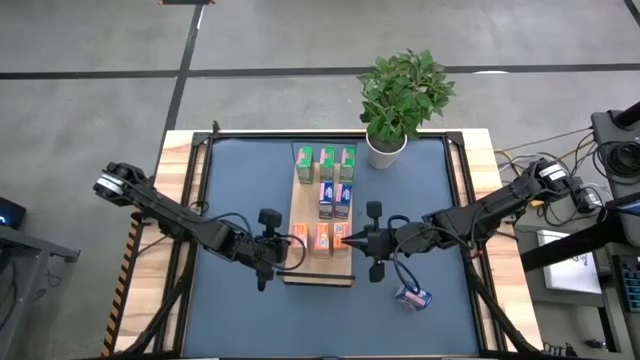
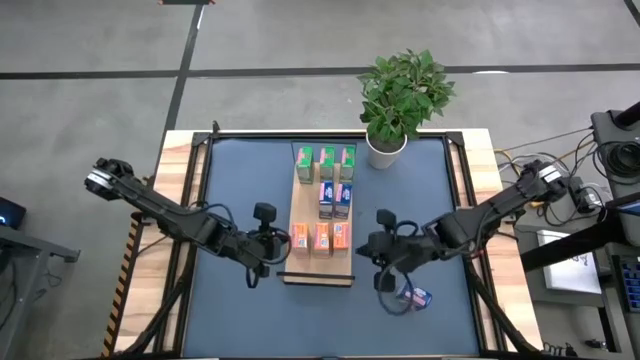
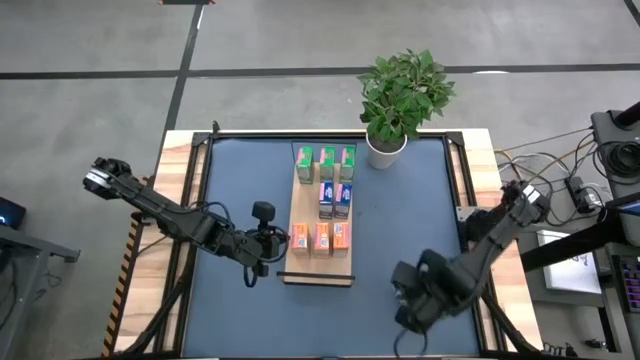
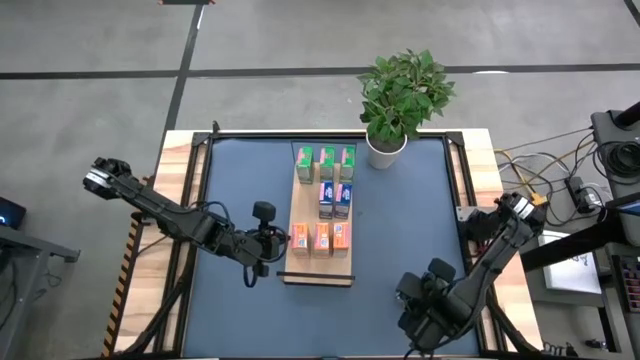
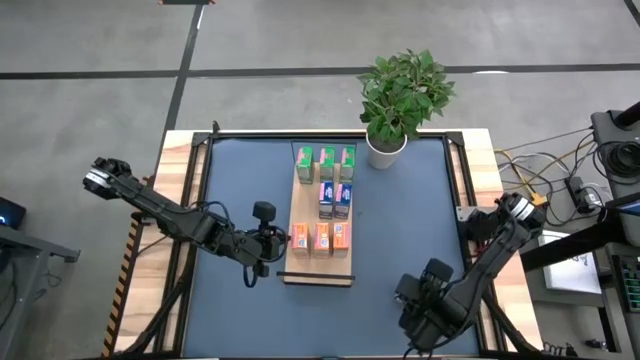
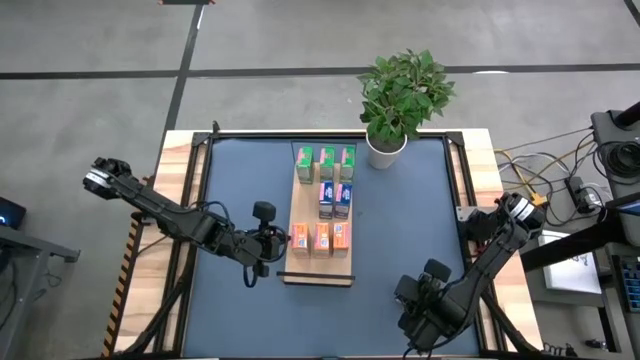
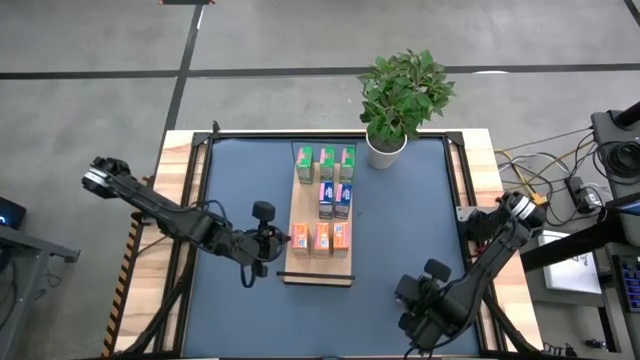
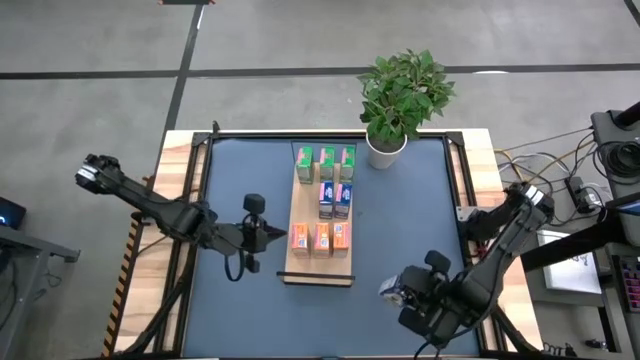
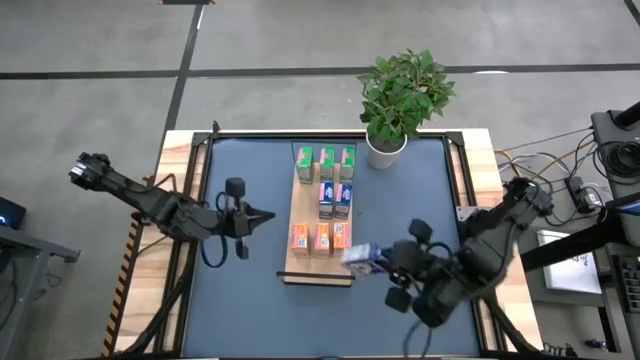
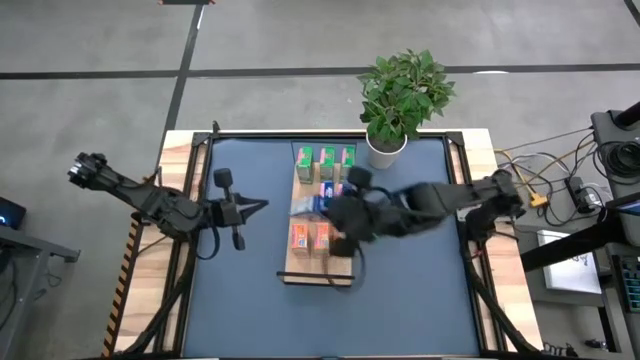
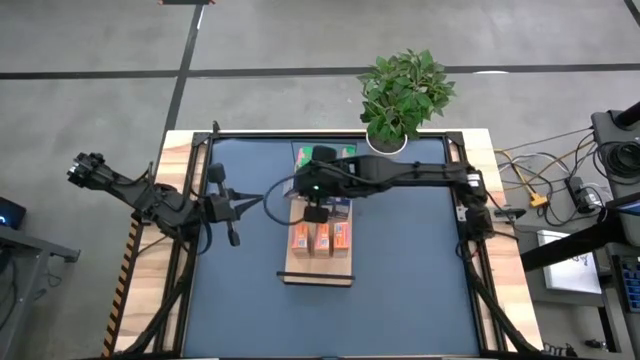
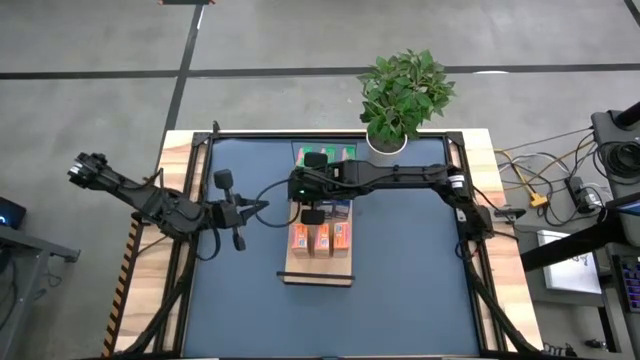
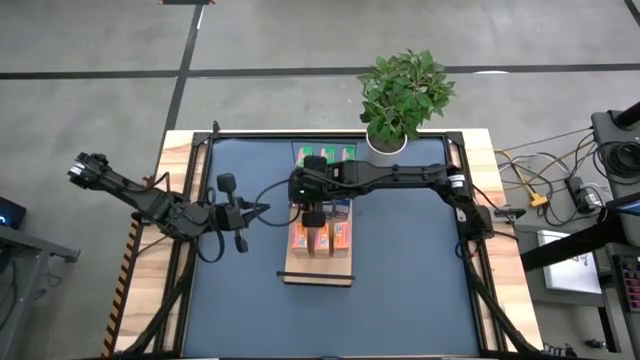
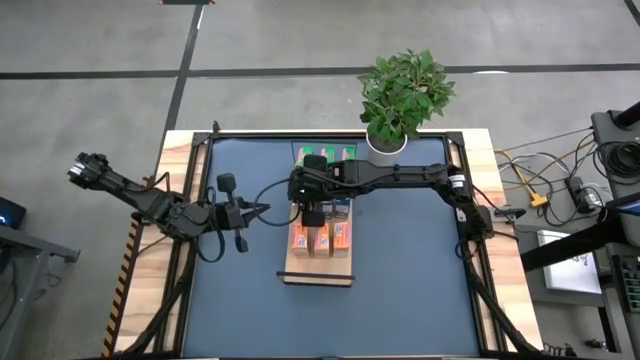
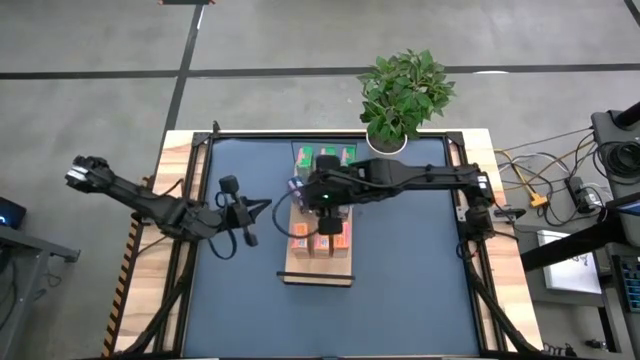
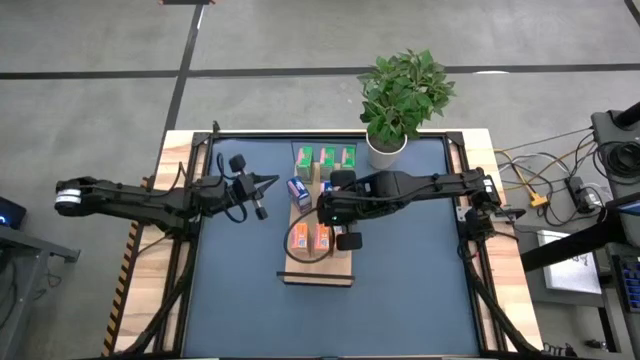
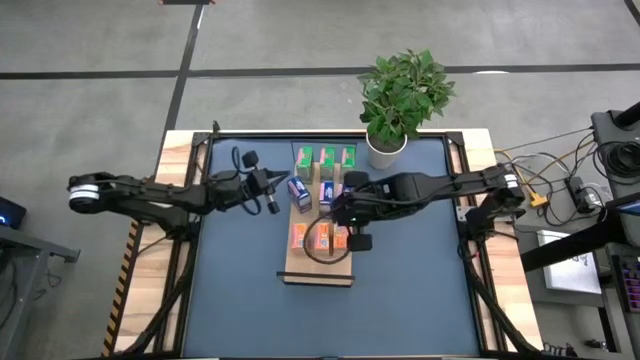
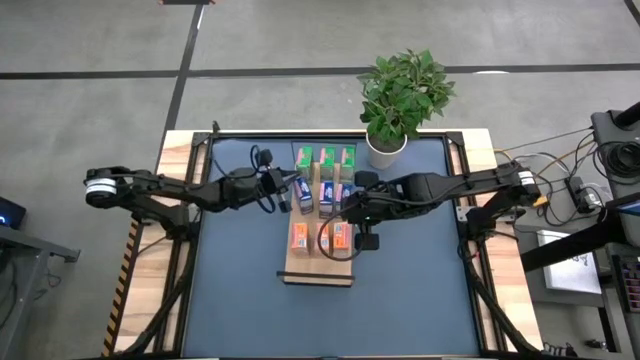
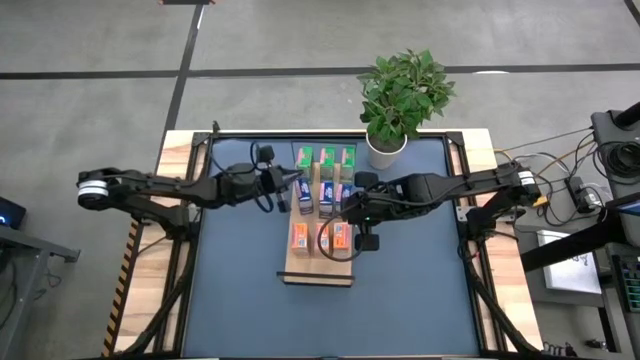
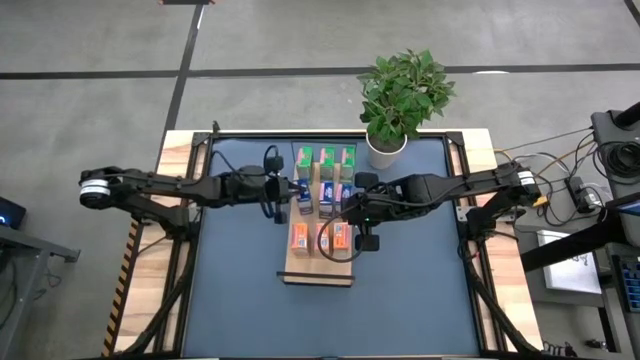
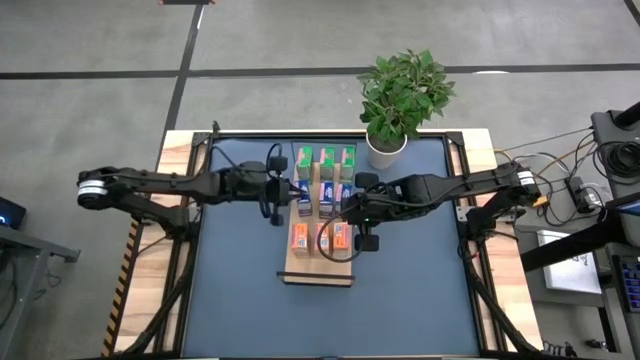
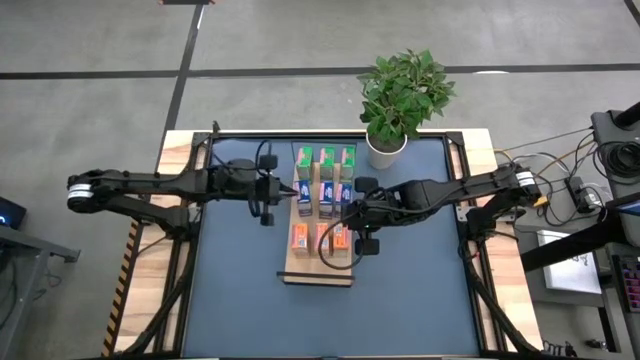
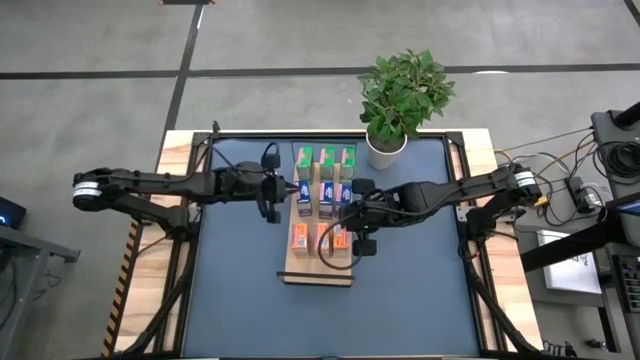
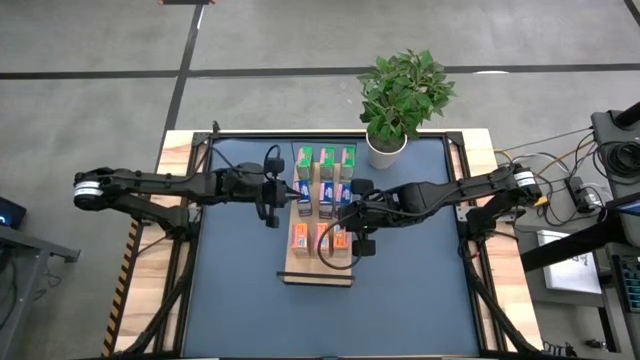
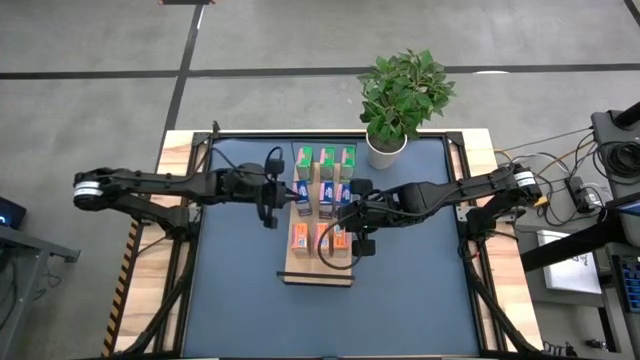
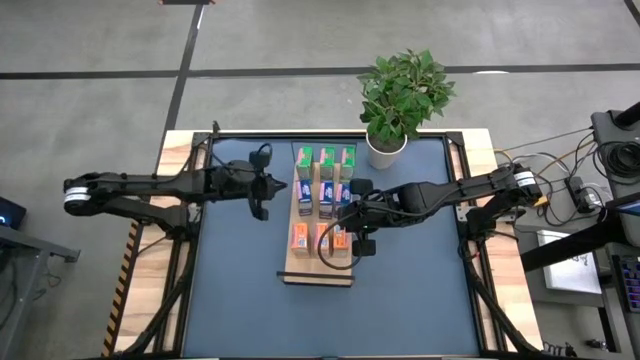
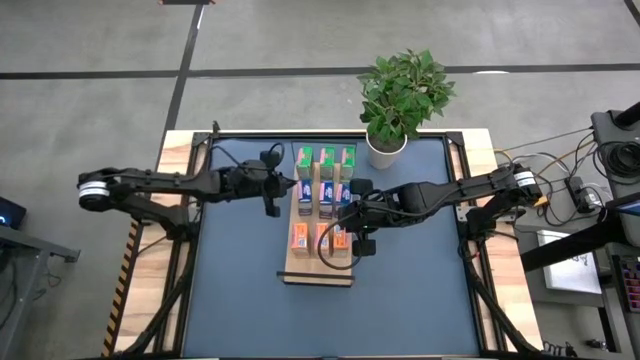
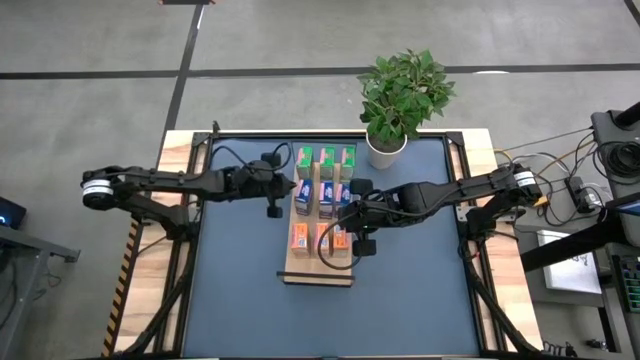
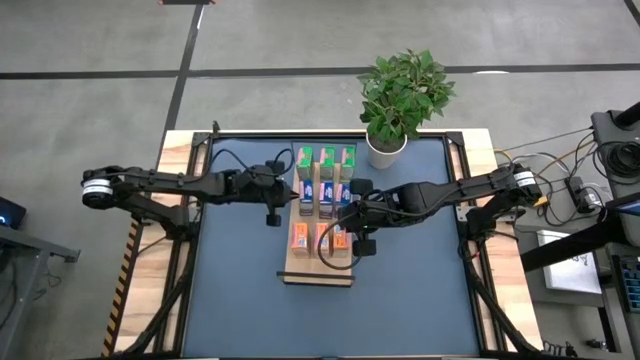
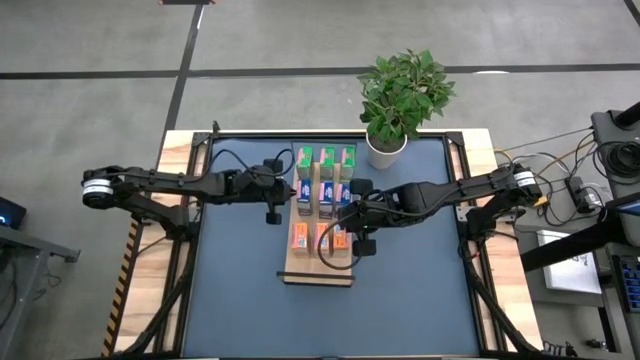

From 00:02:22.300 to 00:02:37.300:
Task: Stack cereal on shelf
Put the blue cereal box on the shelf aligned with the other blue cereal boxes

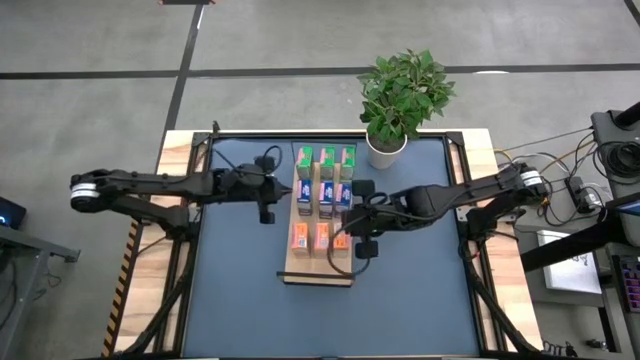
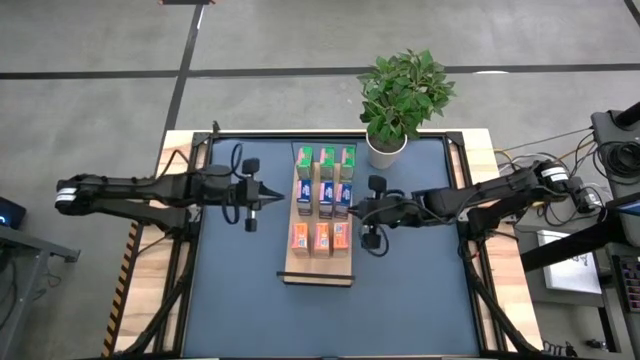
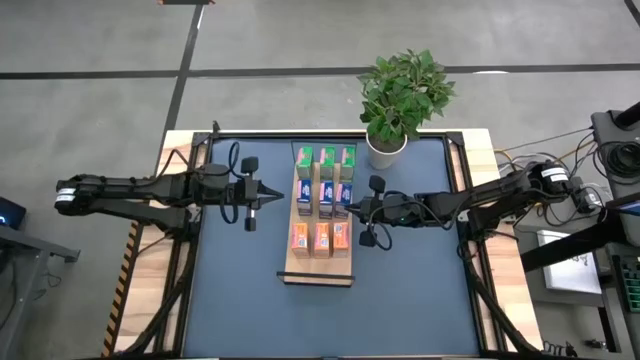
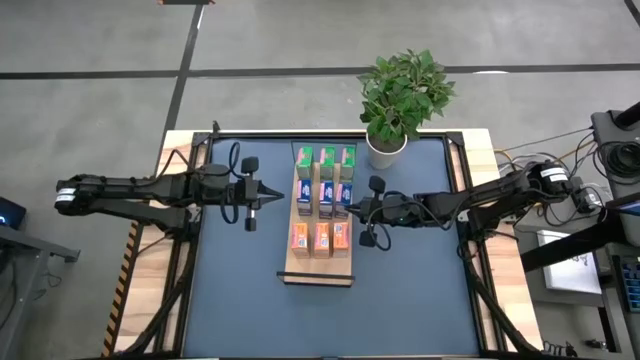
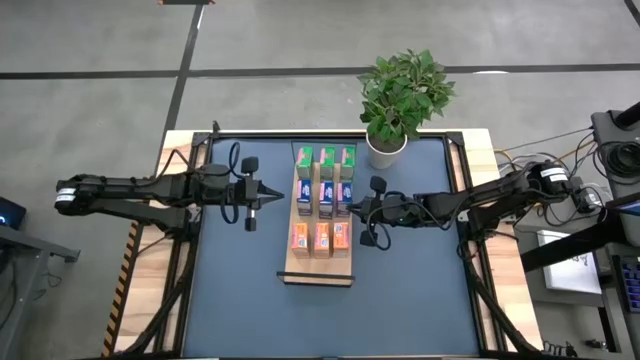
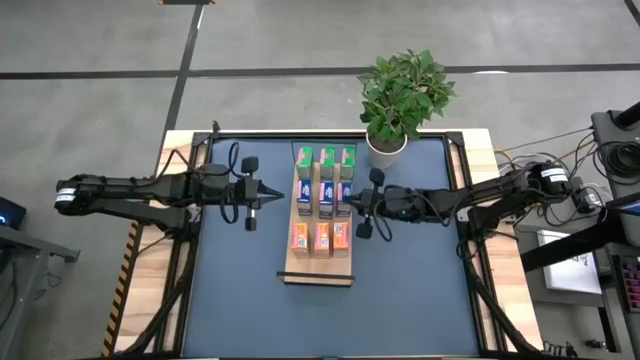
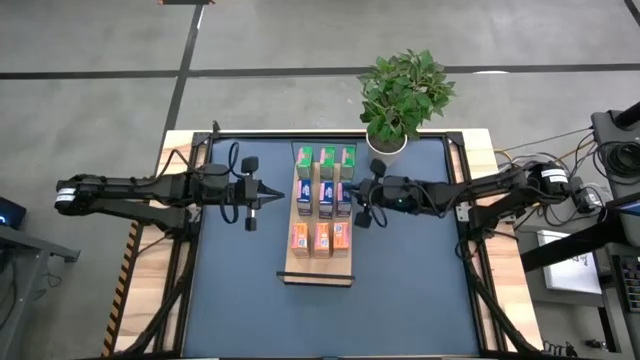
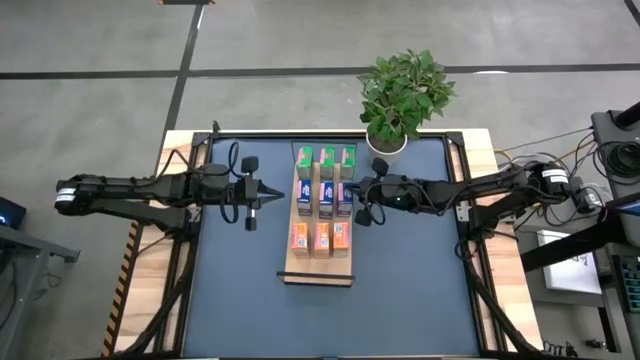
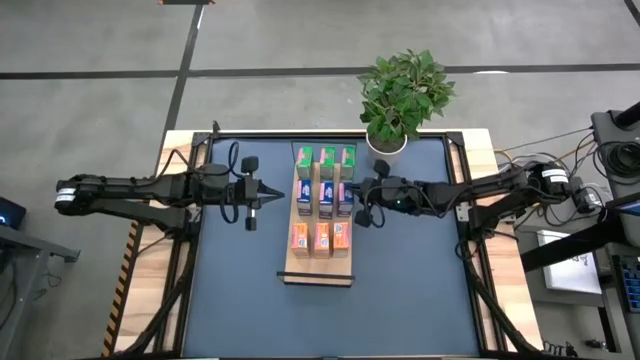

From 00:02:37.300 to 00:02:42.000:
Adjust the blue cereal box on the shelf

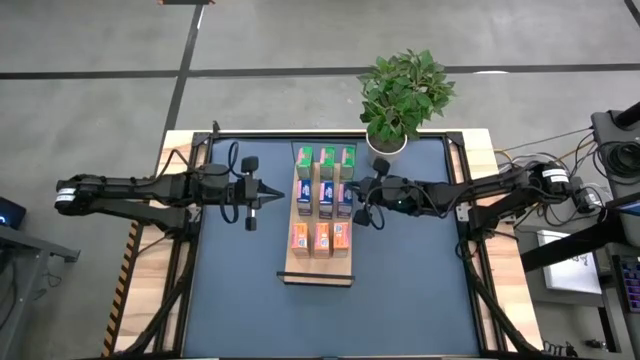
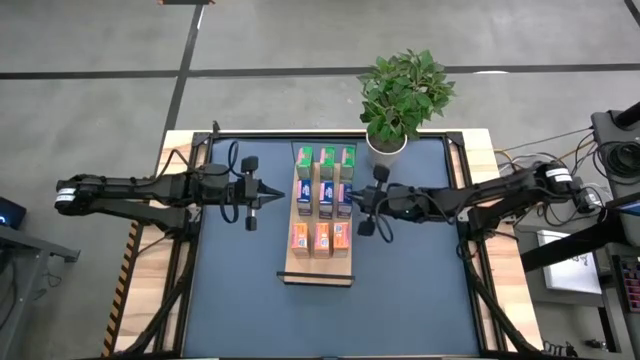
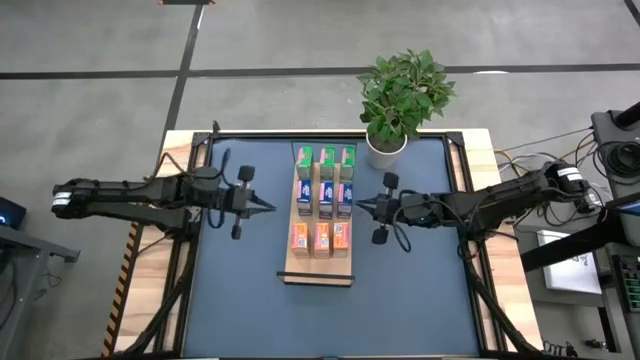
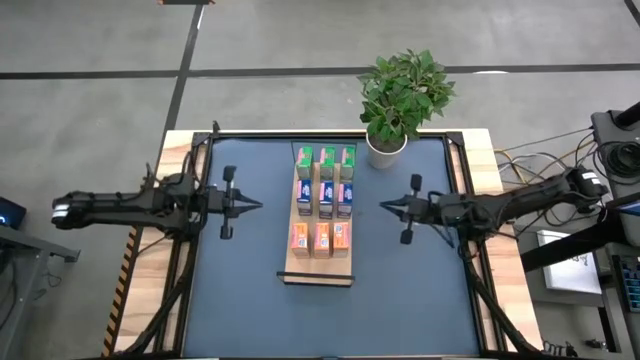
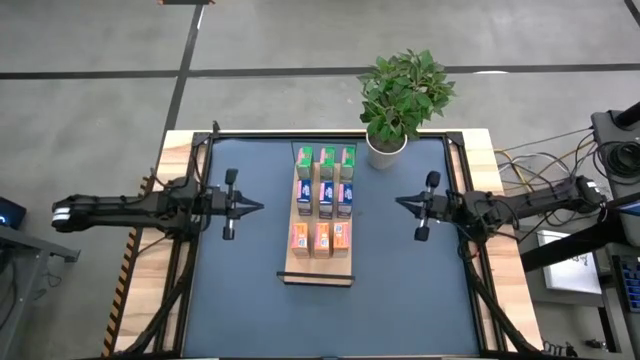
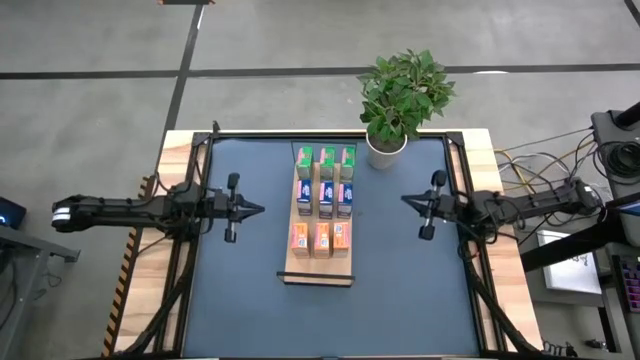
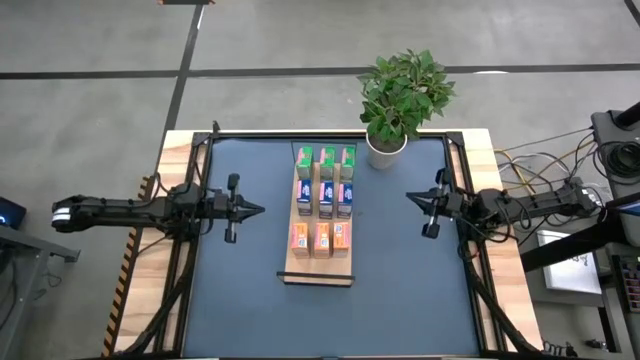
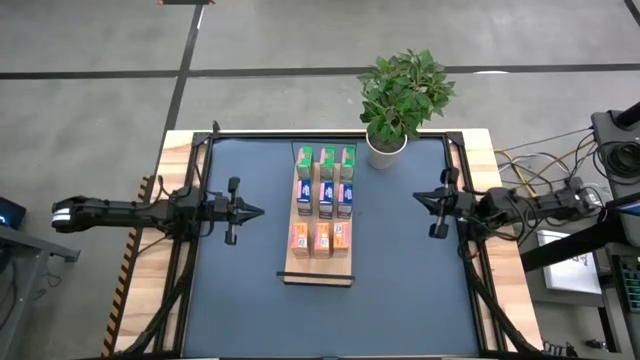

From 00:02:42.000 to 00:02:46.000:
Return to Home Position
